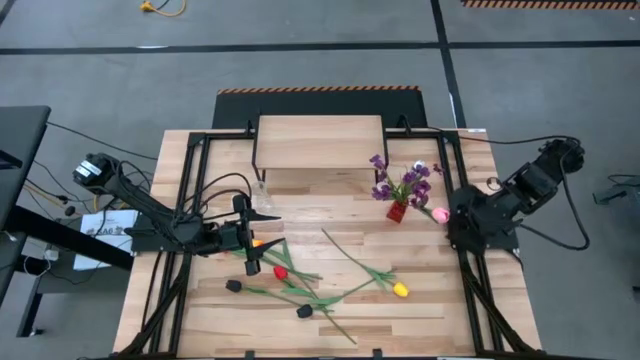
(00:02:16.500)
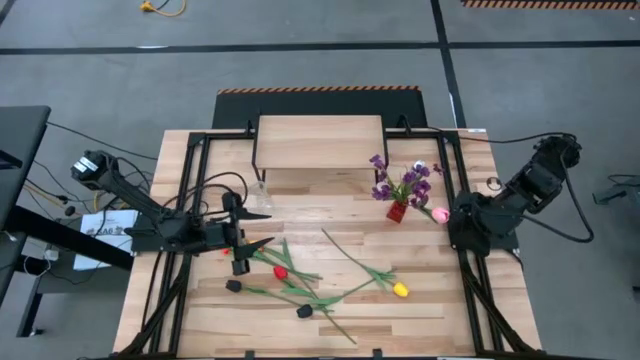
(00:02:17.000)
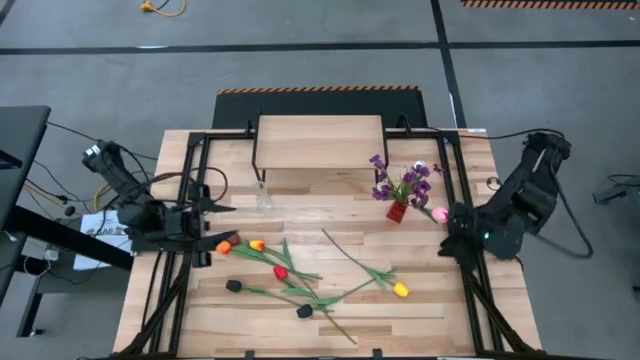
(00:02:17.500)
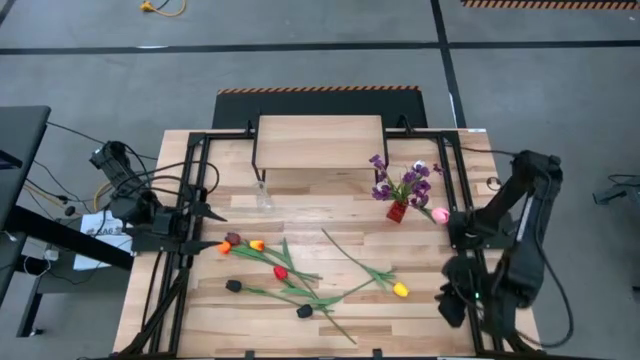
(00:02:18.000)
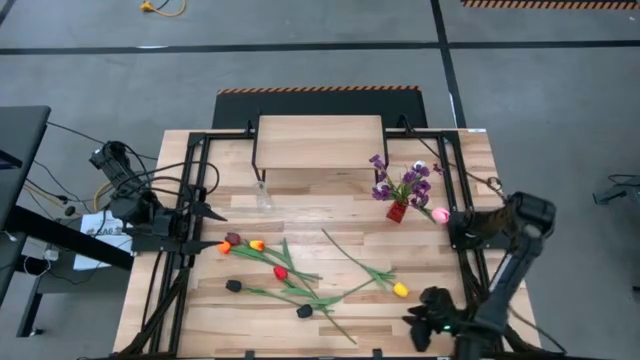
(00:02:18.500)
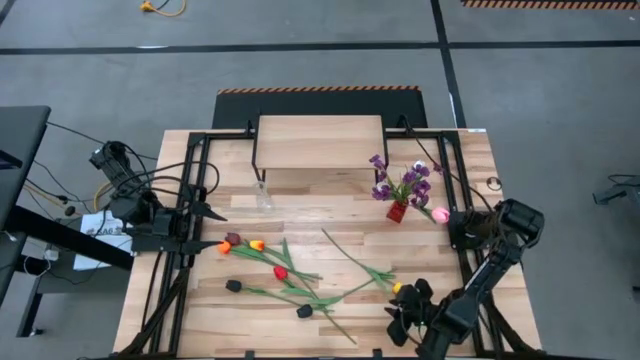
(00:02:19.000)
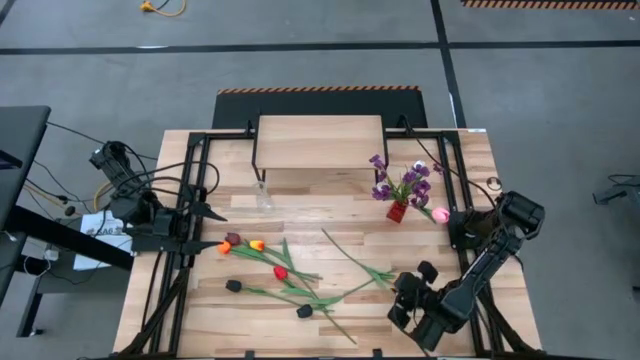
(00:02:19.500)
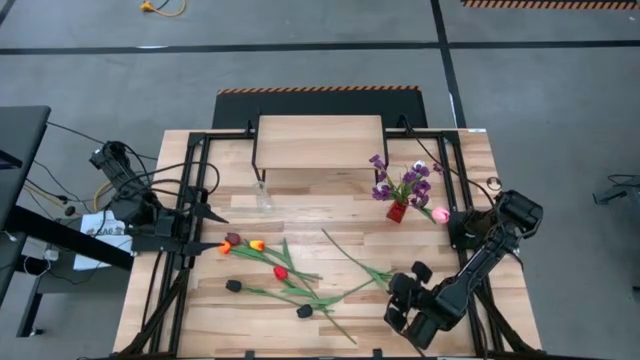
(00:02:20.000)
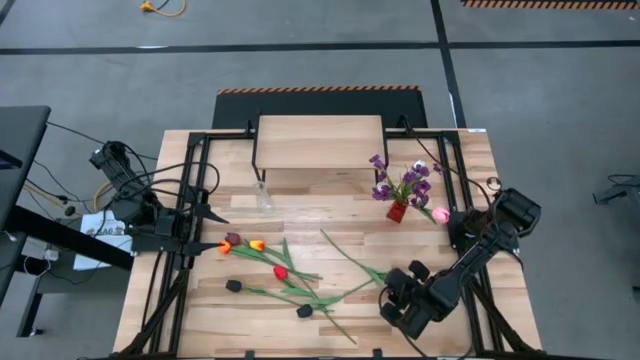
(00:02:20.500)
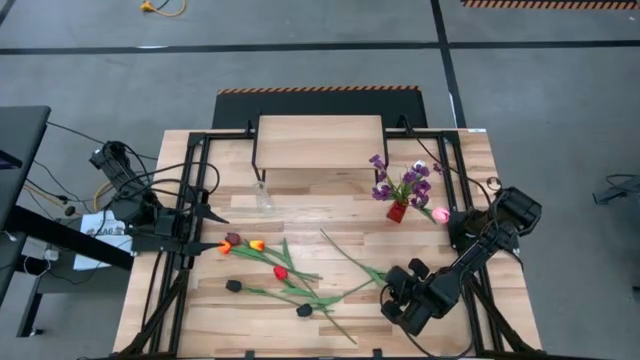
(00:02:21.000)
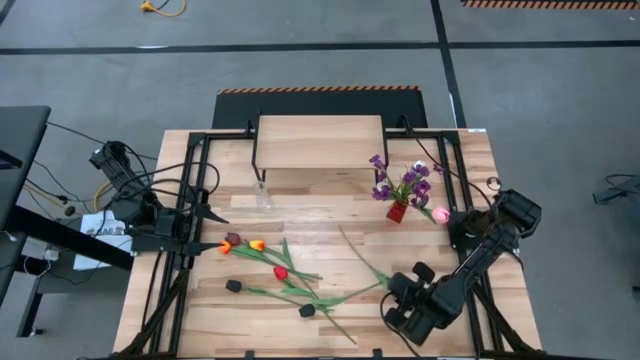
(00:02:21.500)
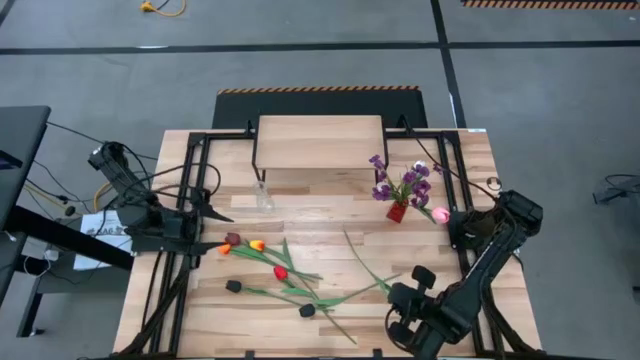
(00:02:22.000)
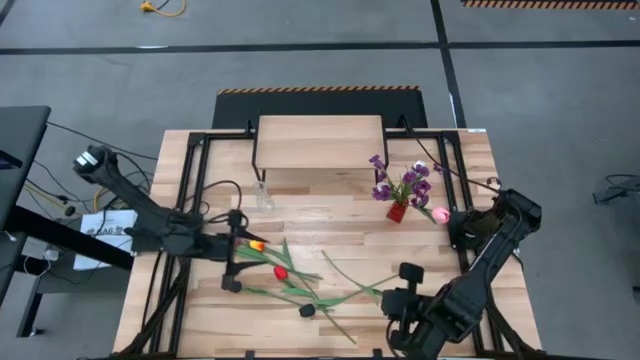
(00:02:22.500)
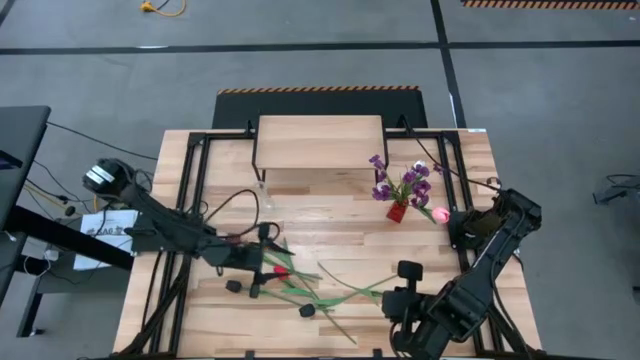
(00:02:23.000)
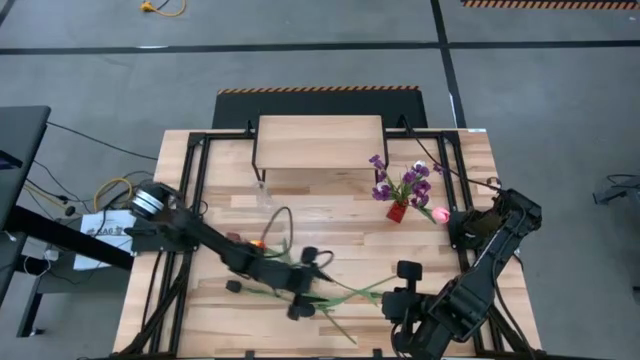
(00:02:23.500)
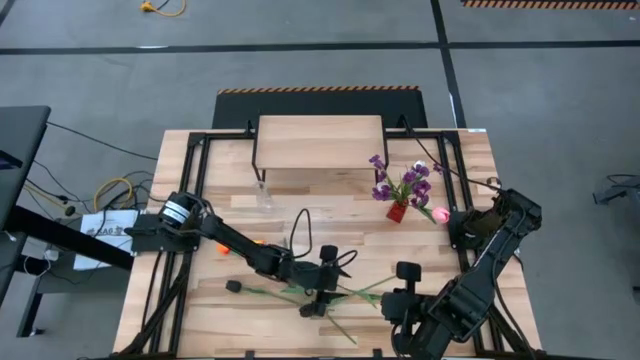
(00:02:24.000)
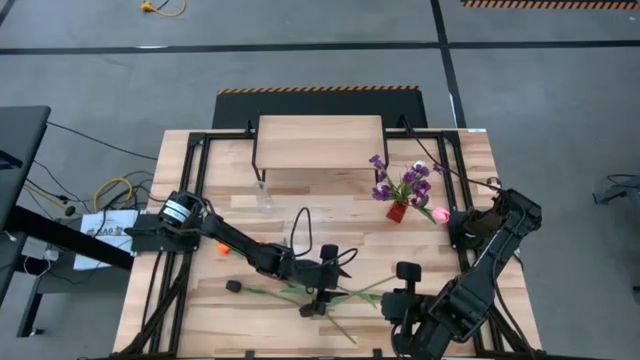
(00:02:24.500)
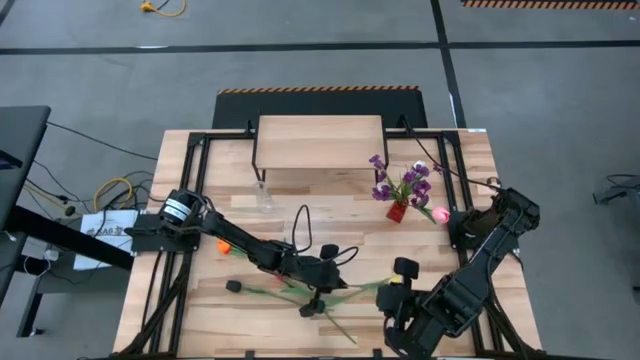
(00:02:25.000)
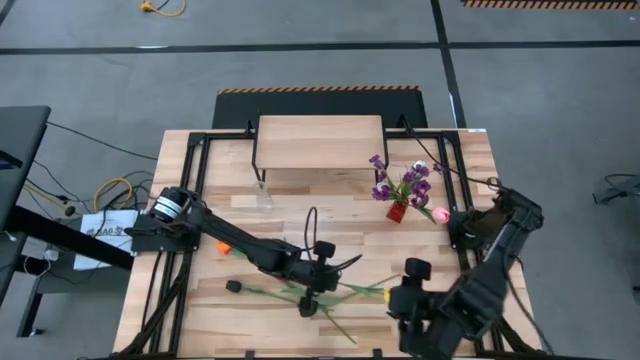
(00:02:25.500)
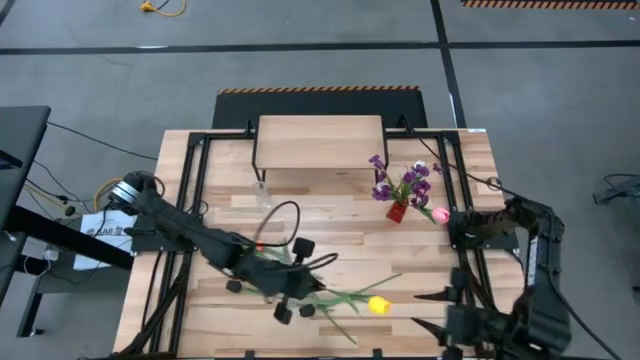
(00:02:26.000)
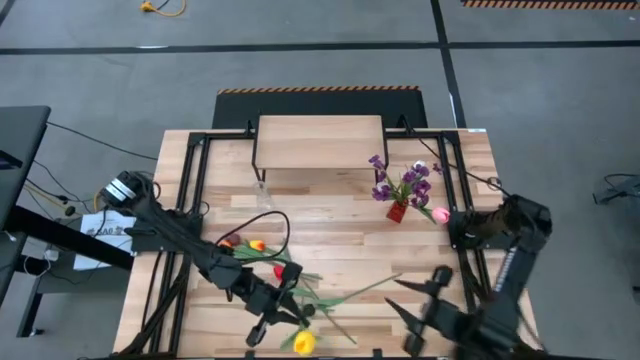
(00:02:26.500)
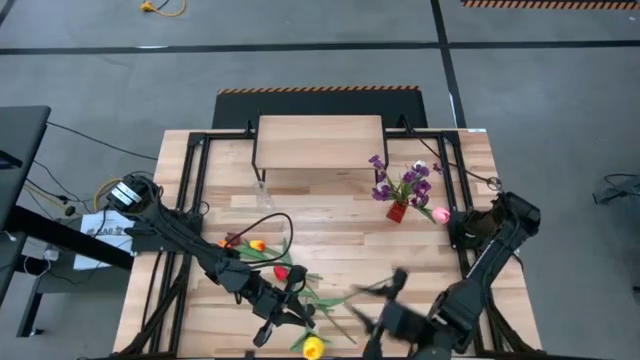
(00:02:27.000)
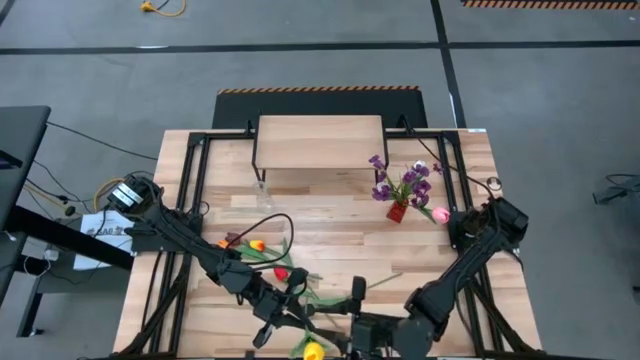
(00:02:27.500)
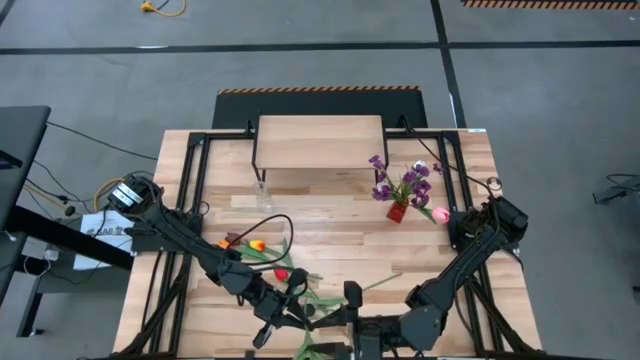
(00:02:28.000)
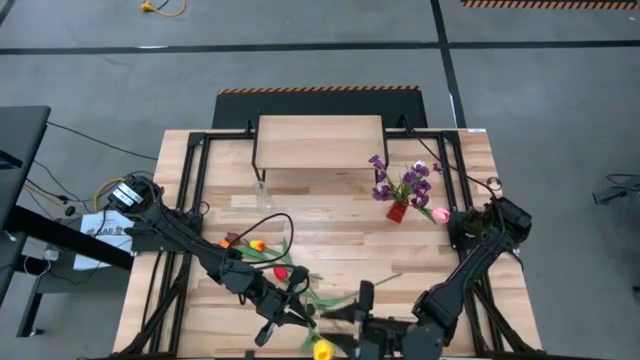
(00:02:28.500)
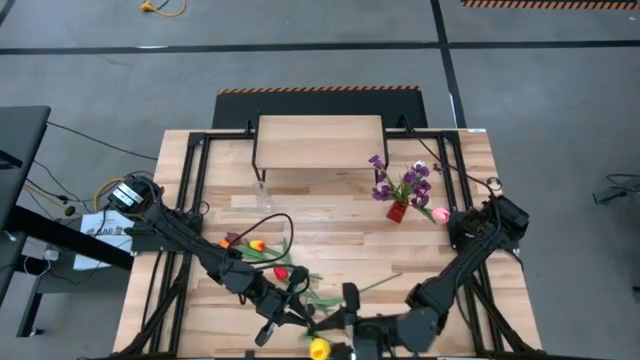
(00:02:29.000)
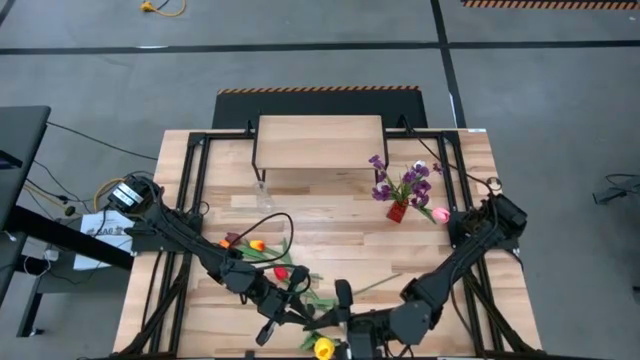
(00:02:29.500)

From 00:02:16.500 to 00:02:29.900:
Task: Pick and place flowers into a vace then onto a shelf
Put the right yellow flower into the red vase

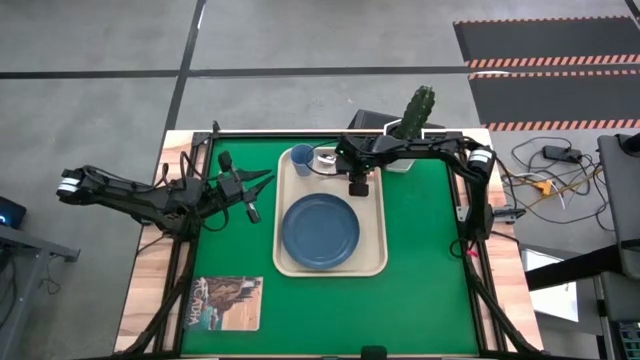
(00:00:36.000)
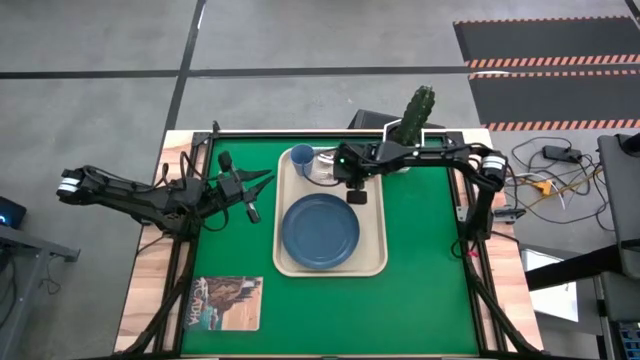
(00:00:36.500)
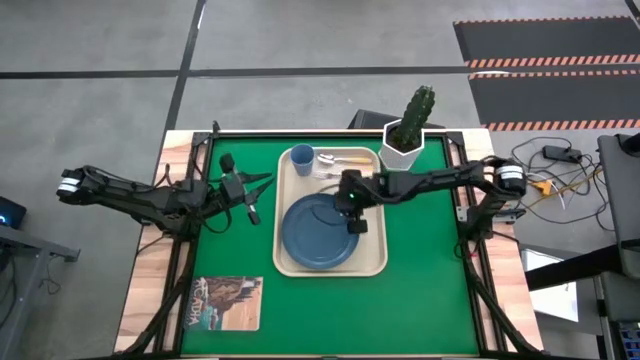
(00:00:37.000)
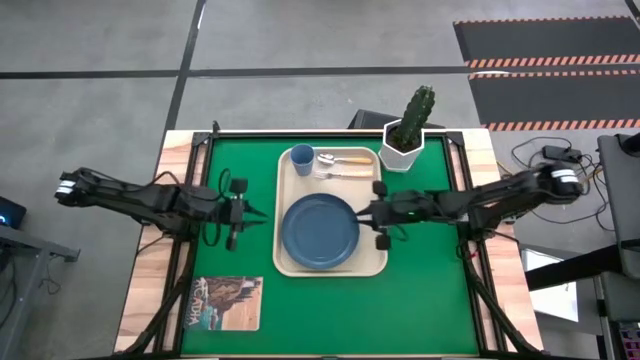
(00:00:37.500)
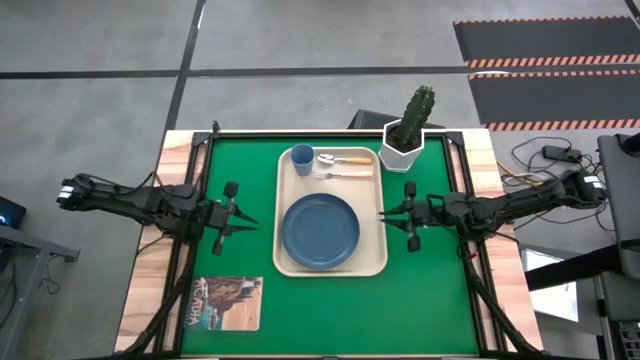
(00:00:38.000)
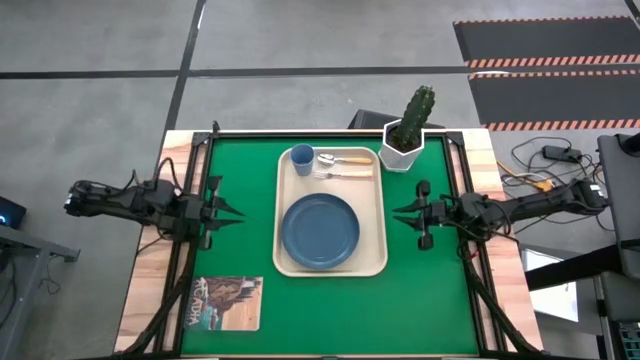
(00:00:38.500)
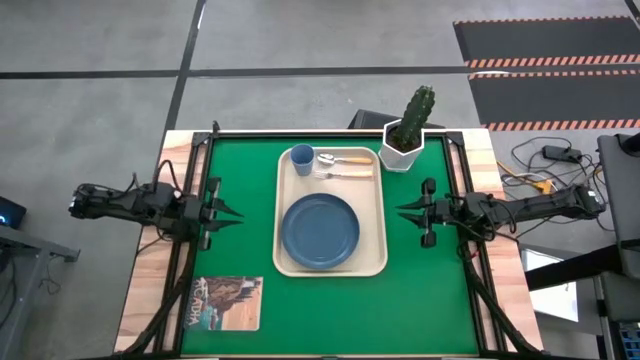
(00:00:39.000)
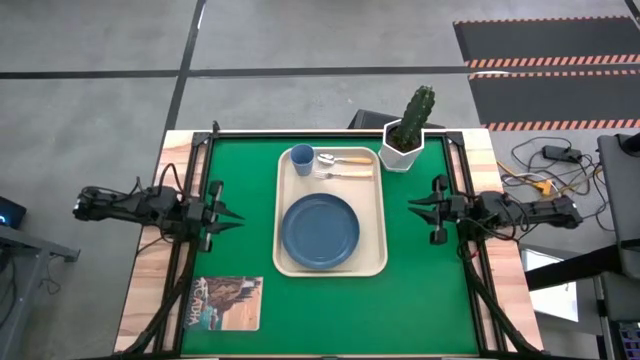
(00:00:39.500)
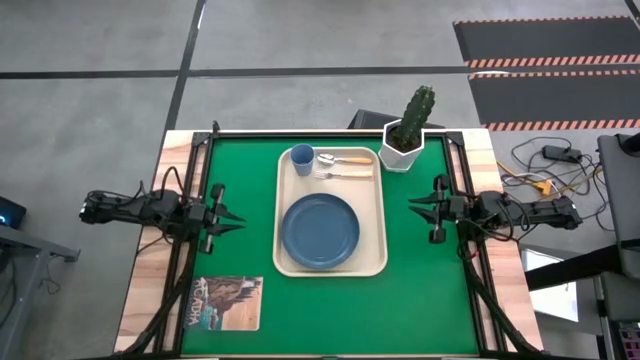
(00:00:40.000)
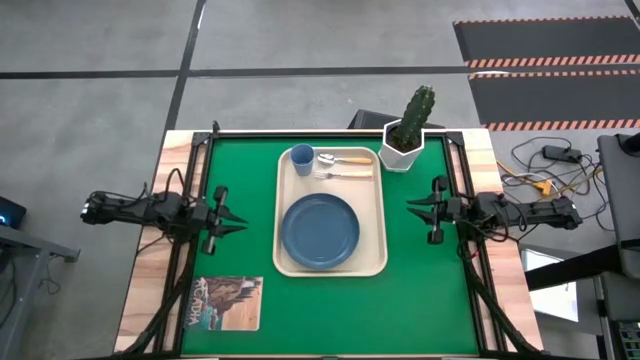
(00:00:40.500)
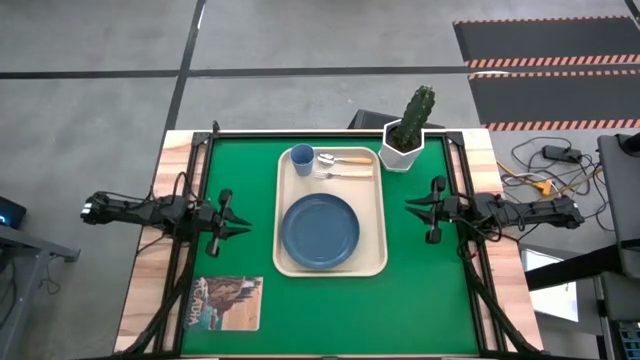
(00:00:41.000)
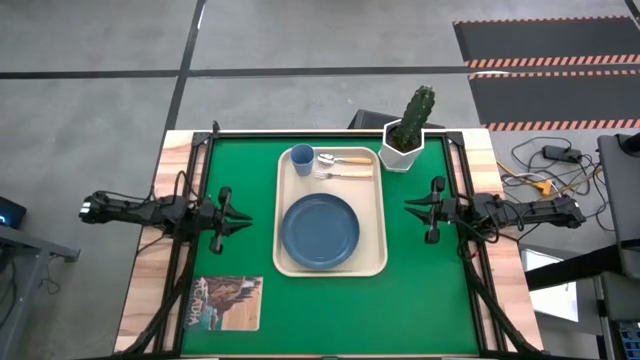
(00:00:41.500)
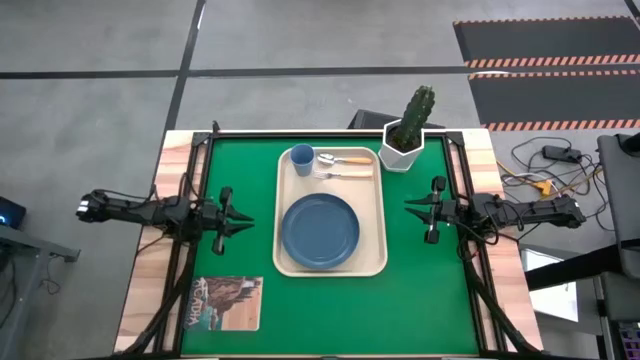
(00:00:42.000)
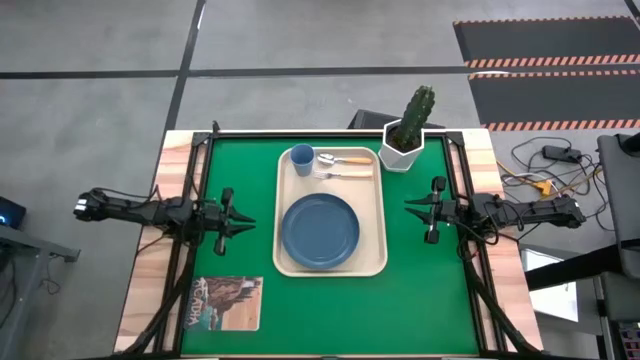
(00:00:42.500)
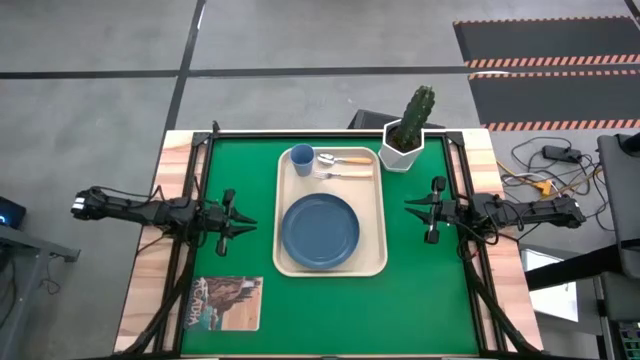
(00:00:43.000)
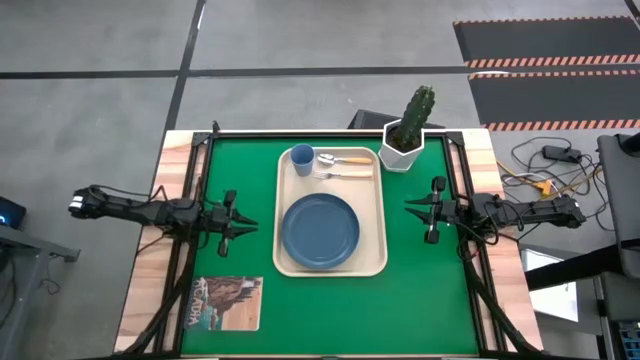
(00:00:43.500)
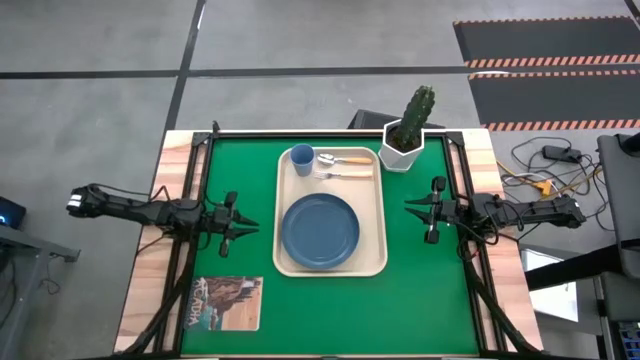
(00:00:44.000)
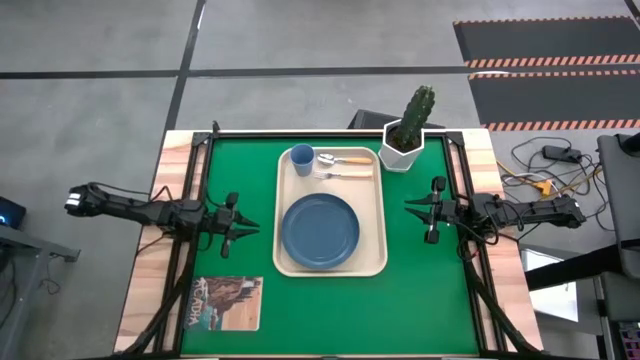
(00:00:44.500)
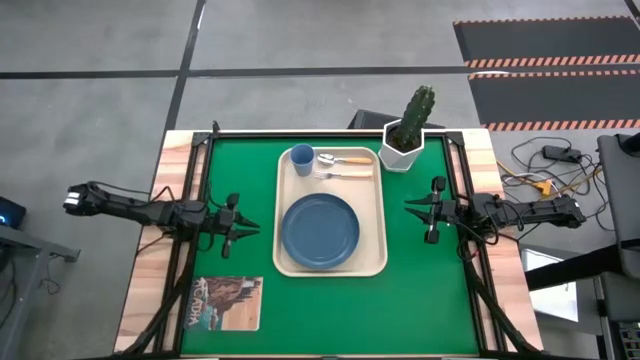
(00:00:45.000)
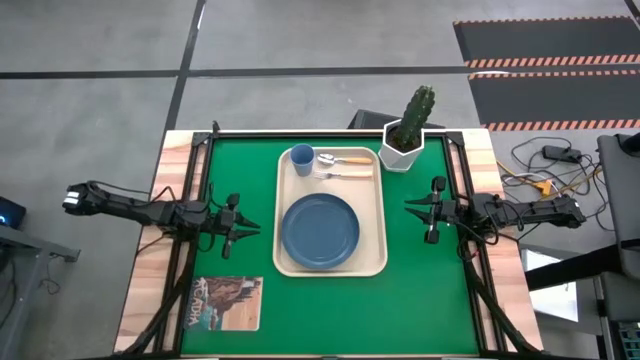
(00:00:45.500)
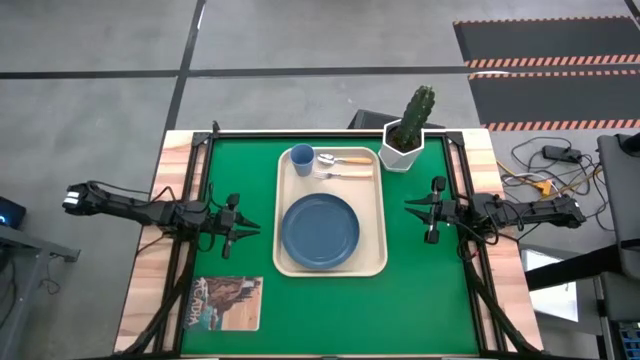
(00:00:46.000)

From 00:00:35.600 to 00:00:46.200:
Task: Pick and place plate/cup/fork/spoon on tray
Return to Home Position
